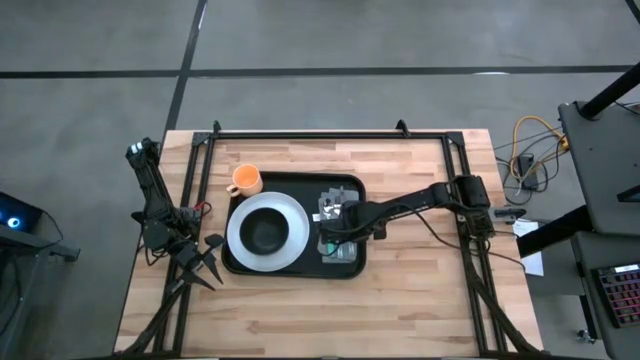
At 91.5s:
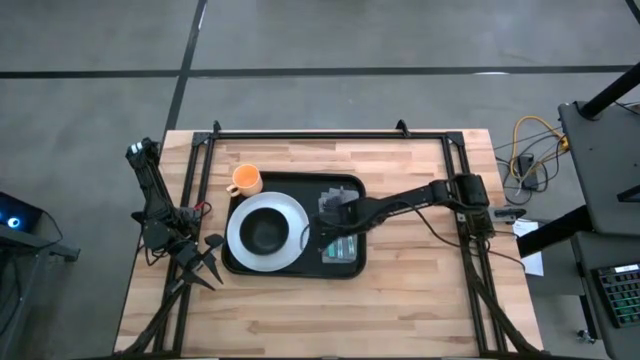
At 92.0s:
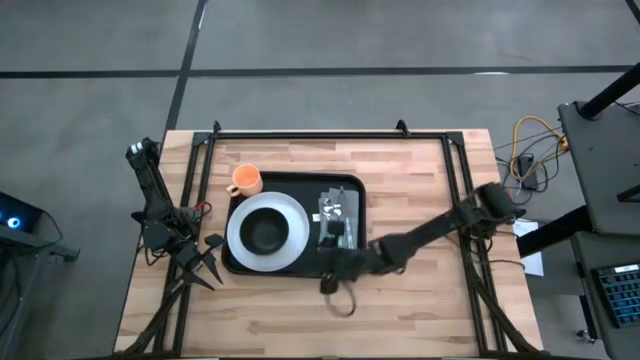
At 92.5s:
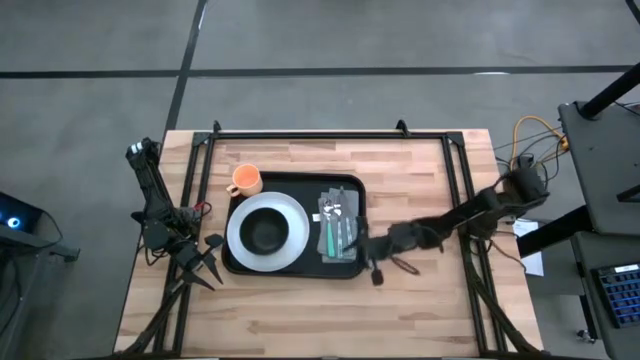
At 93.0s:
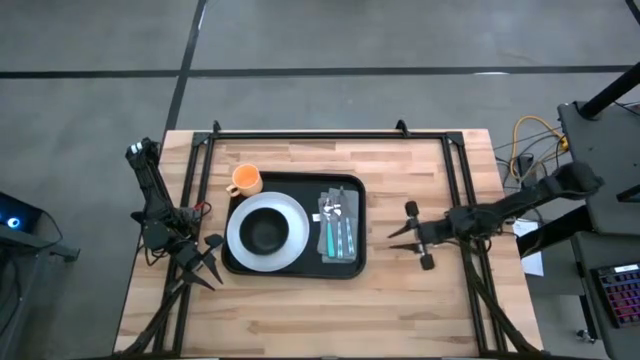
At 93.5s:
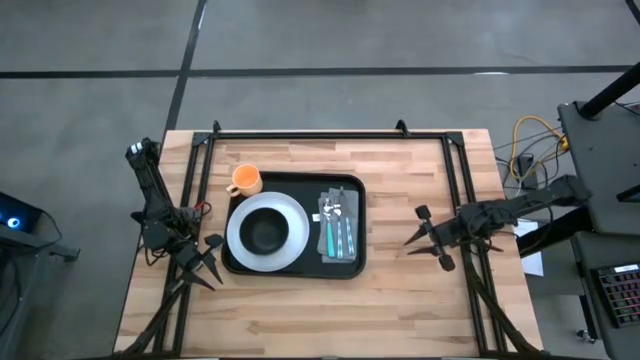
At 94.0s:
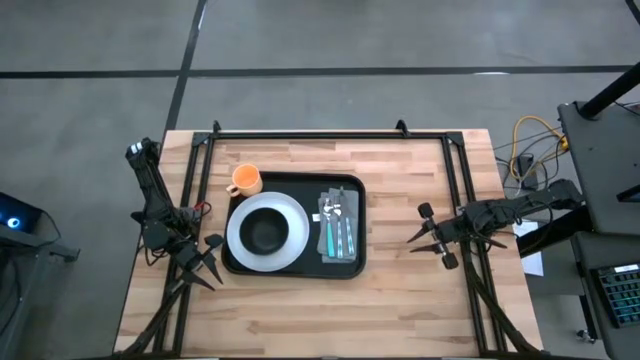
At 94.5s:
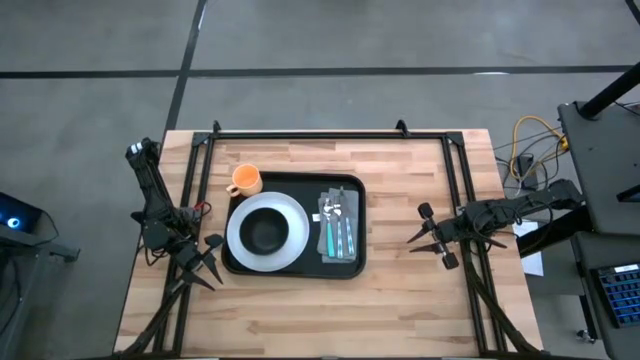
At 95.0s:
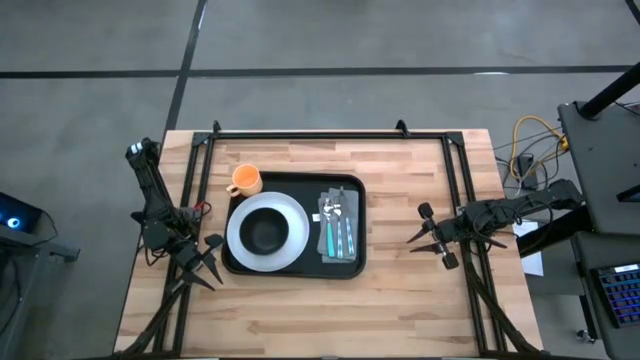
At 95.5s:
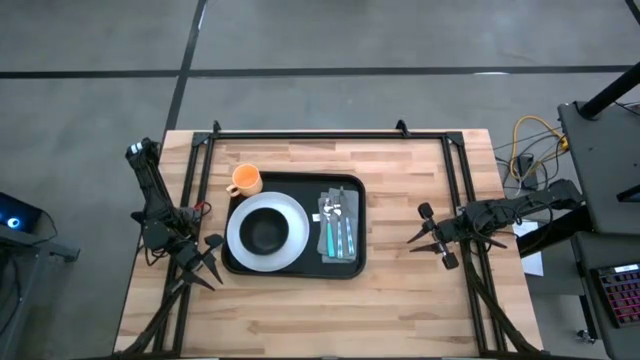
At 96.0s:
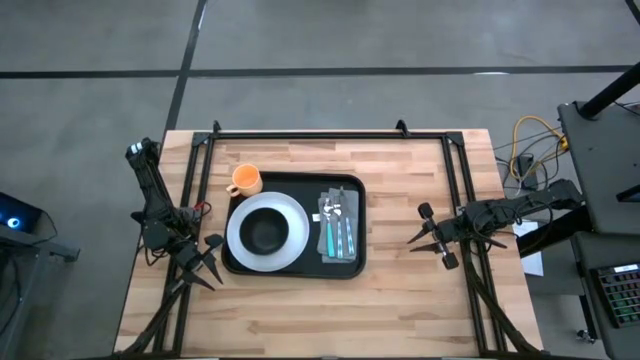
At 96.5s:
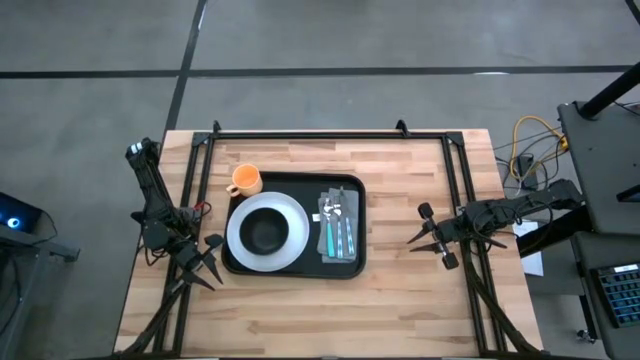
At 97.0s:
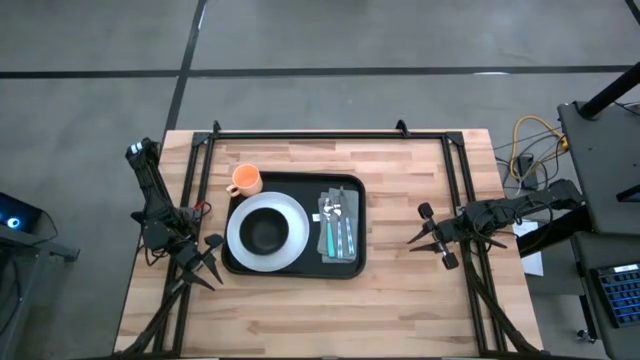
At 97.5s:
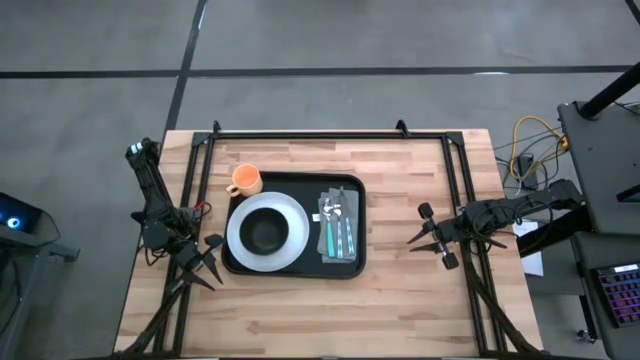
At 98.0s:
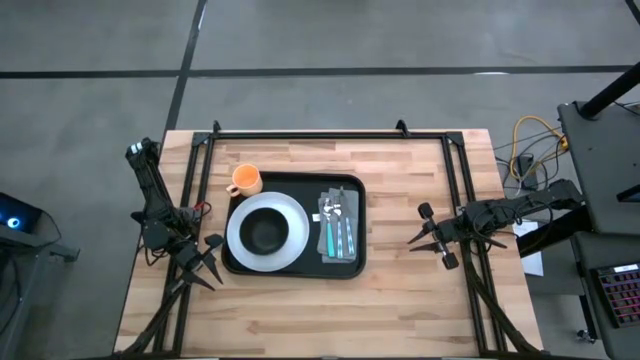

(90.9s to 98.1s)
Task: Set up tray
Return to Home Position

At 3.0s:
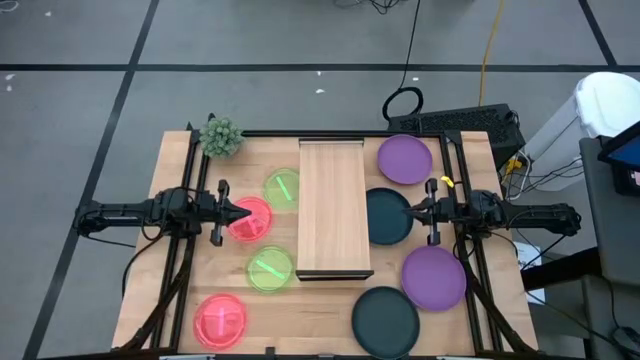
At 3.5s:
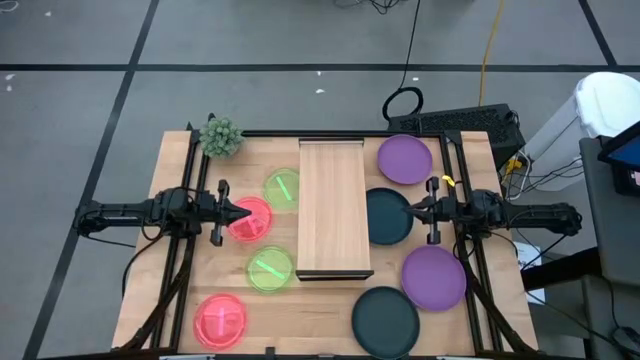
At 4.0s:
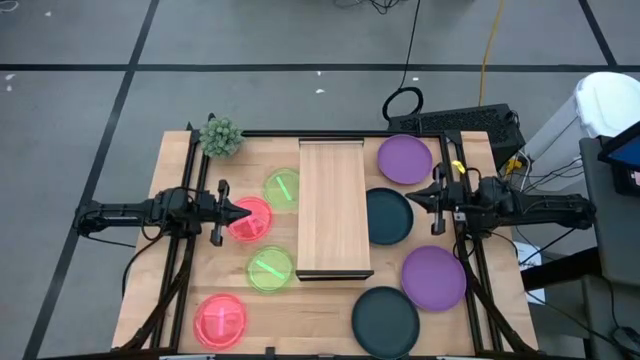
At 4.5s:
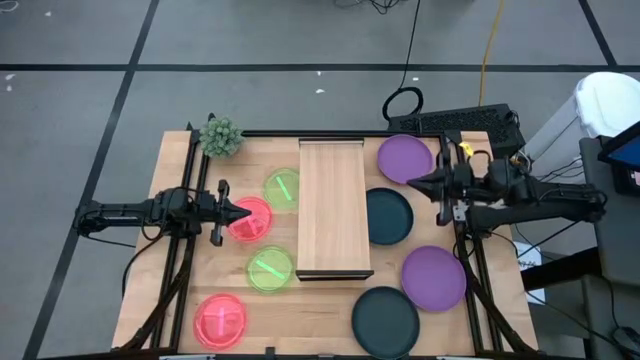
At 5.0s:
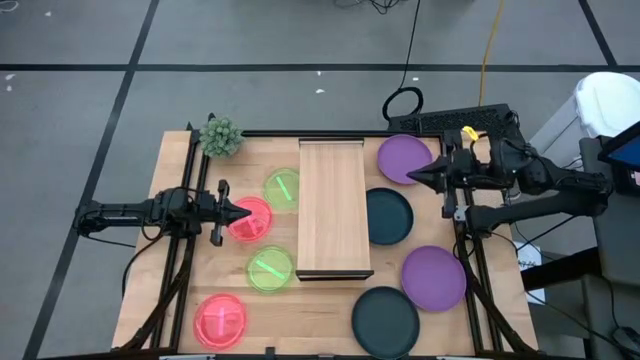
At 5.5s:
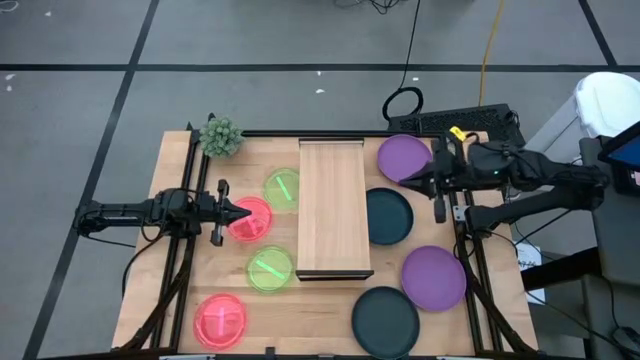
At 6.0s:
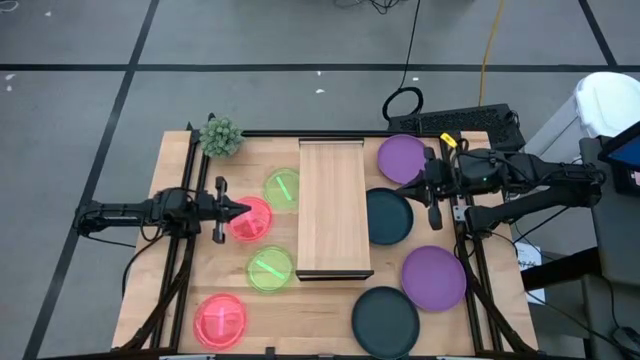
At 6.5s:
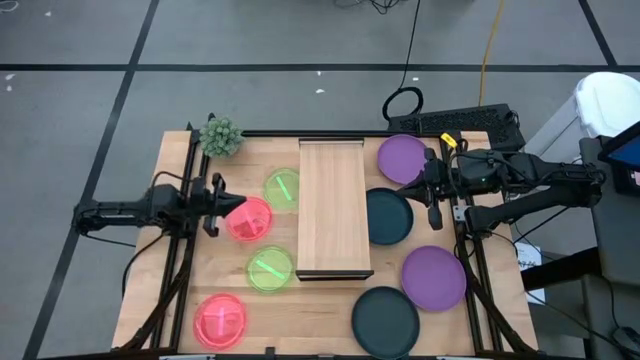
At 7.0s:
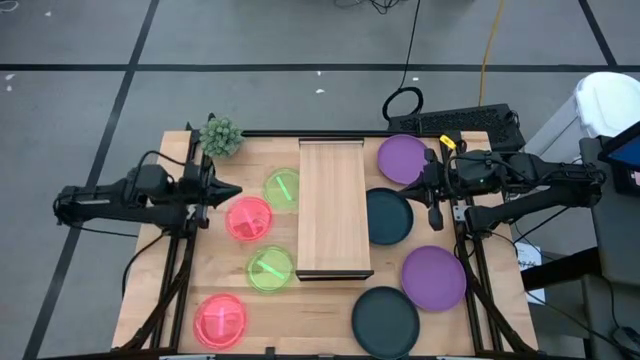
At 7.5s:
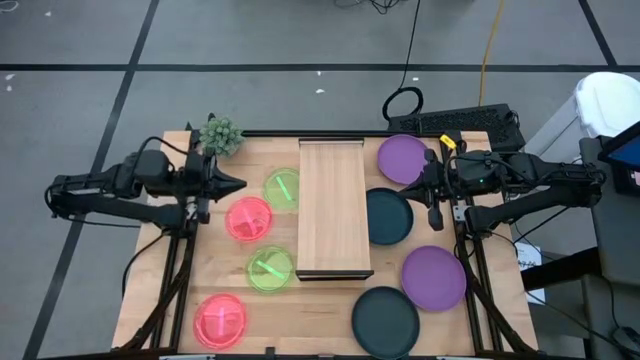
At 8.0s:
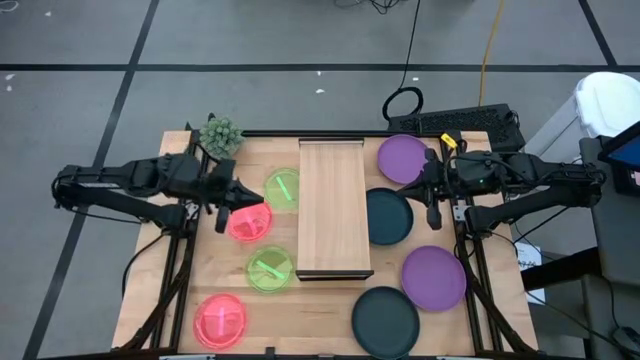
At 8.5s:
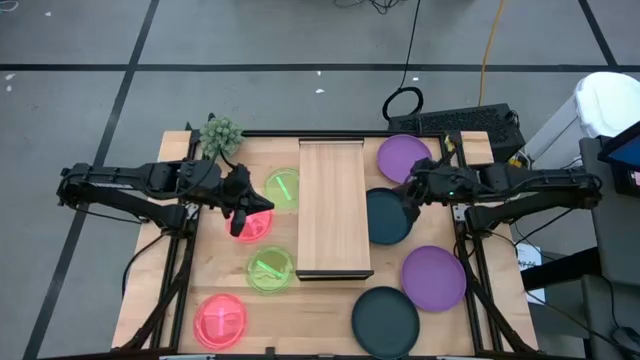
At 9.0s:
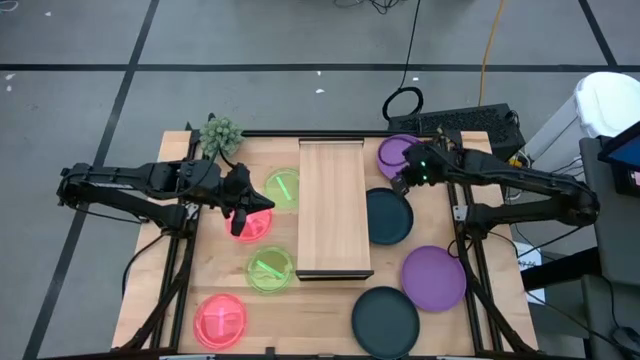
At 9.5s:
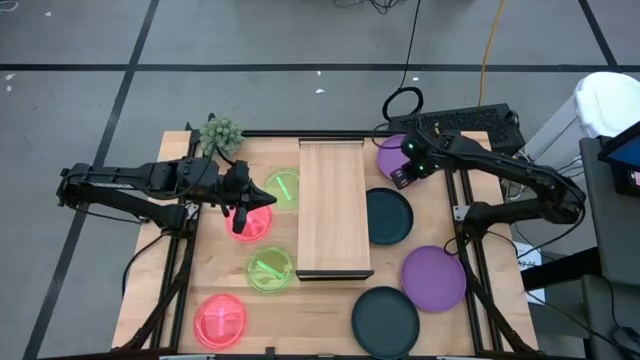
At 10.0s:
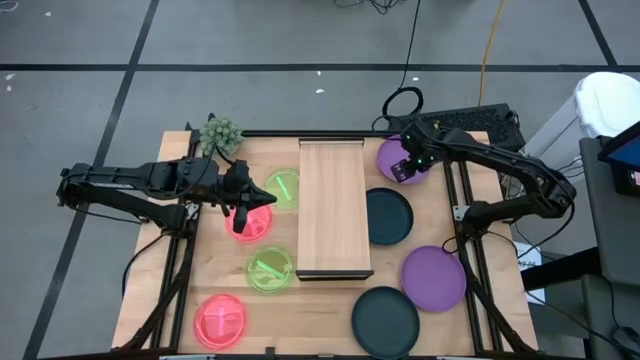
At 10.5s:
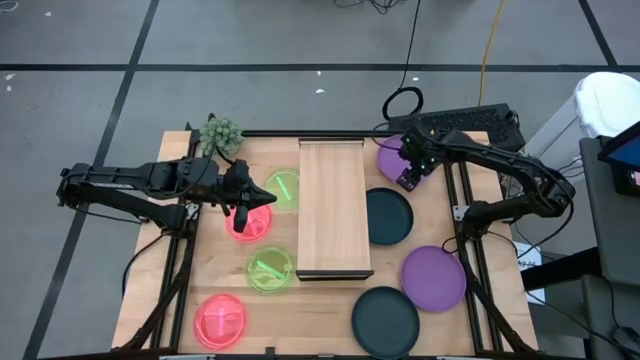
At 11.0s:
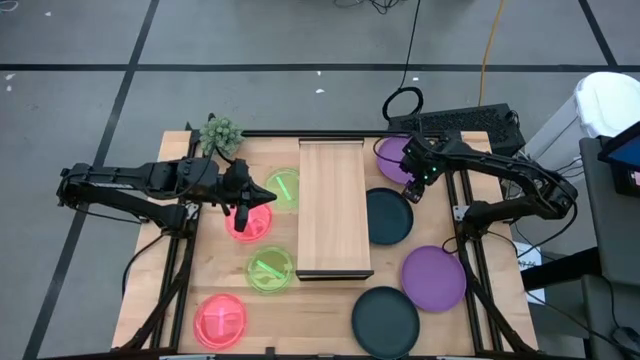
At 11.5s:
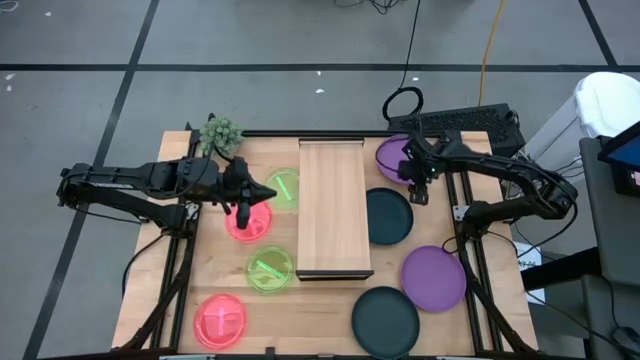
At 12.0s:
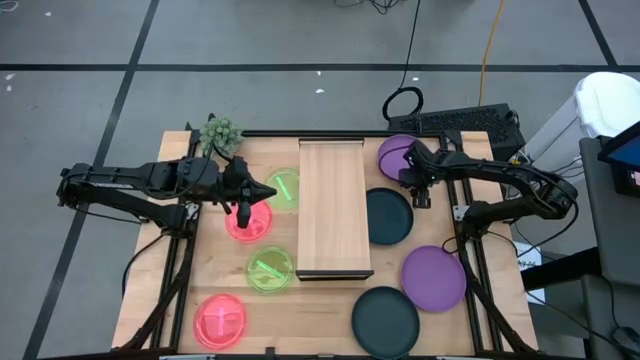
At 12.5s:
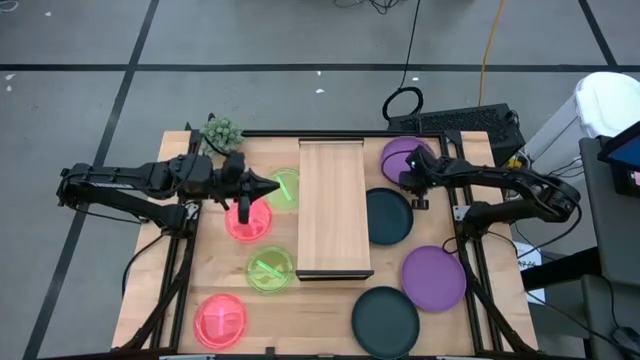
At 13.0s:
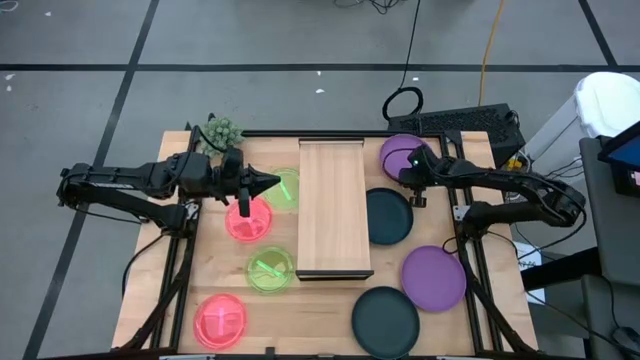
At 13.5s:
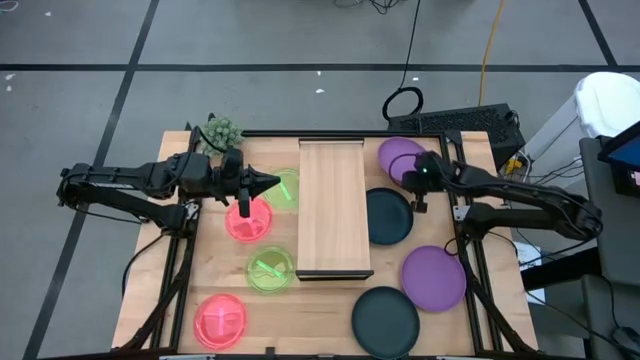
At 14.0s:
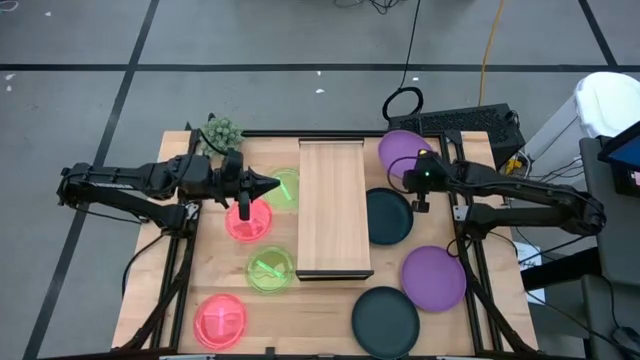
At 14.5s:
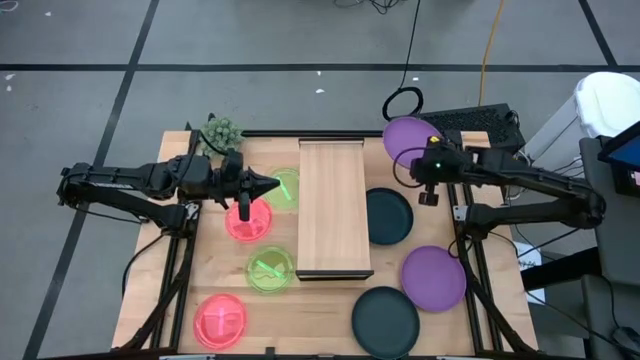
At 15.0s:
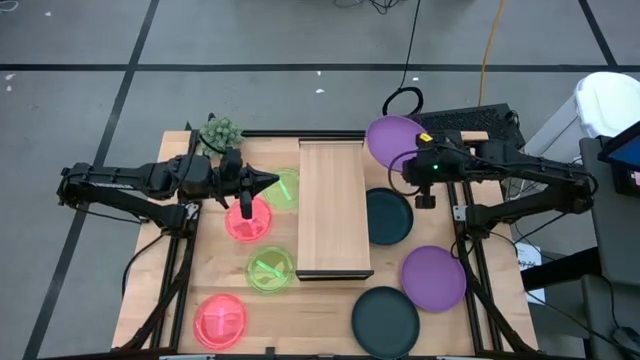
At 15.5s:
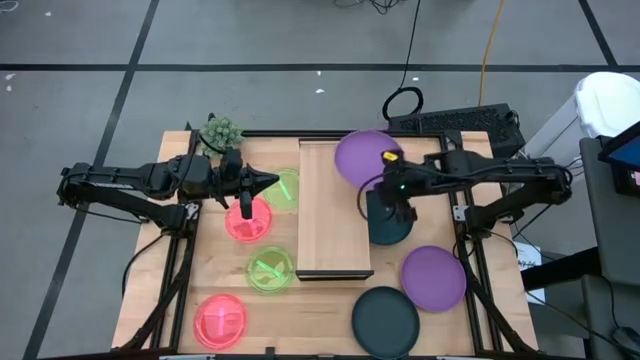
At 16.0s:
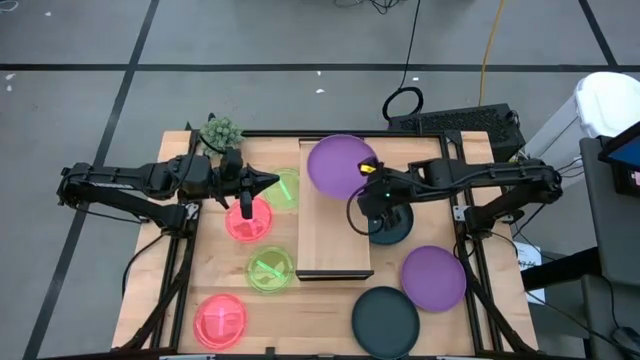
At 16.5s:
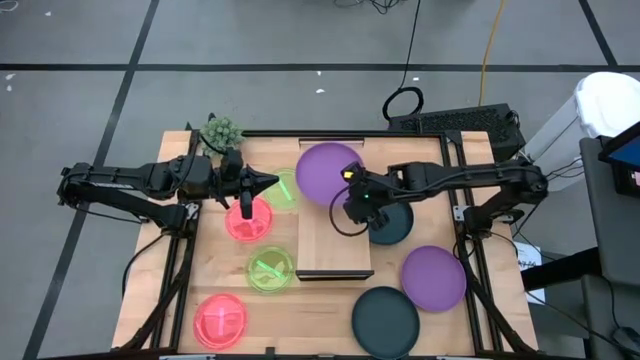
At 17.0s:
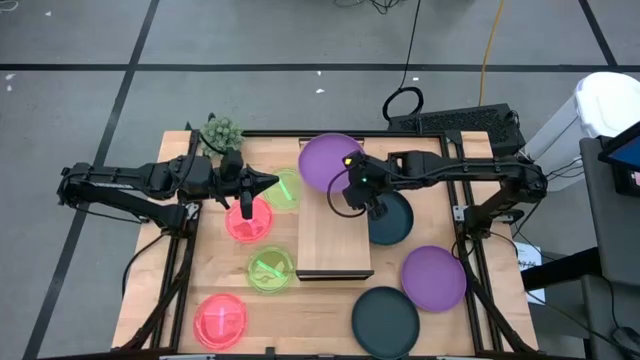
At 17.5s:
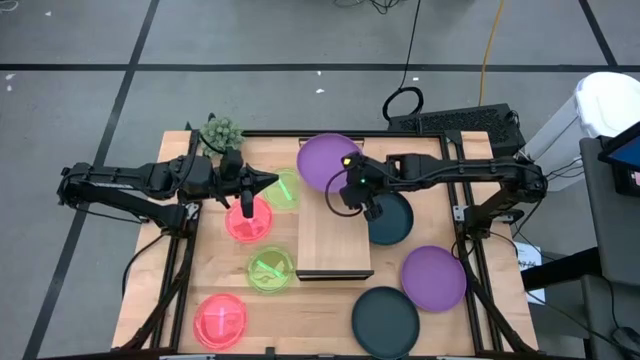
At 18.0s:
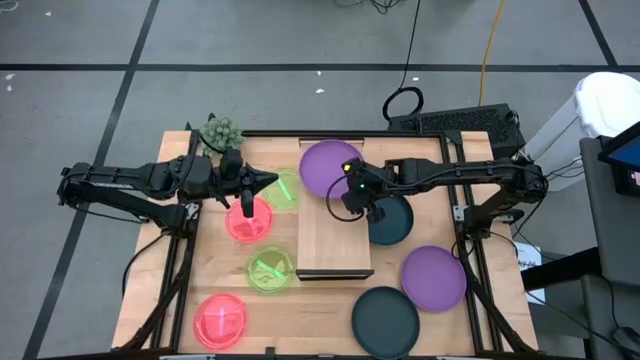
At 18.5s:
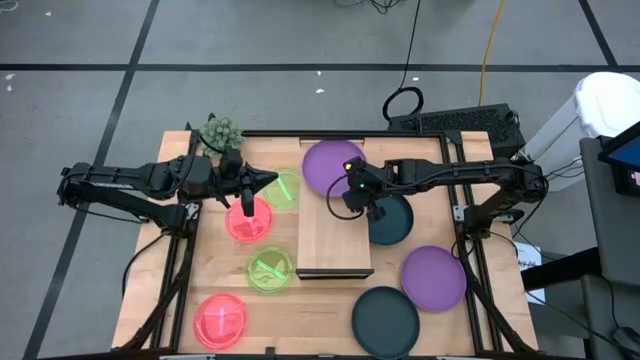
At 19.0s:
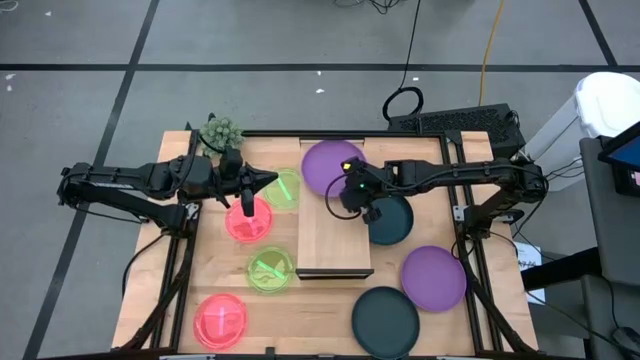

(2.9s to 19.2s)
Task: Place and stack plates onto a shelf
Put the top purple plate on the shelf
